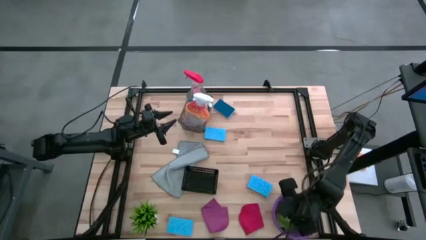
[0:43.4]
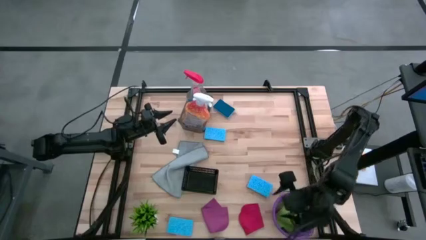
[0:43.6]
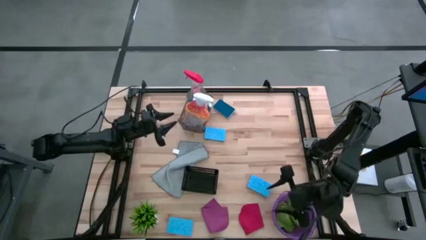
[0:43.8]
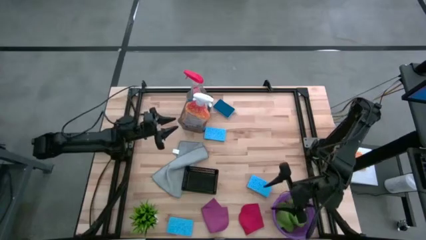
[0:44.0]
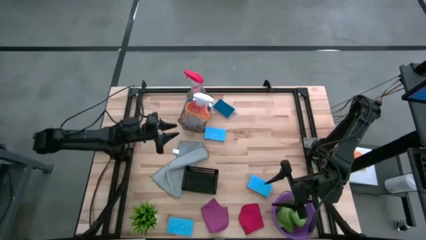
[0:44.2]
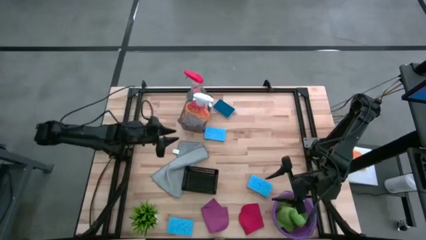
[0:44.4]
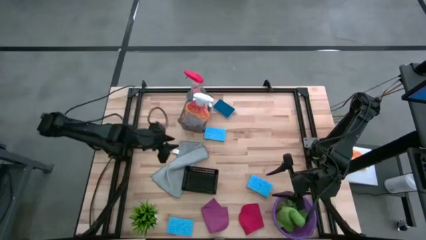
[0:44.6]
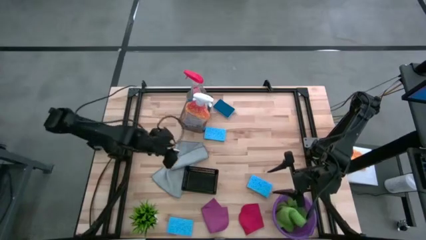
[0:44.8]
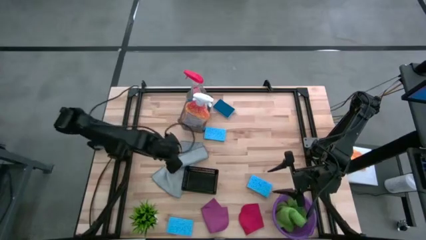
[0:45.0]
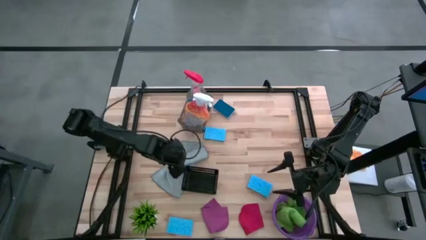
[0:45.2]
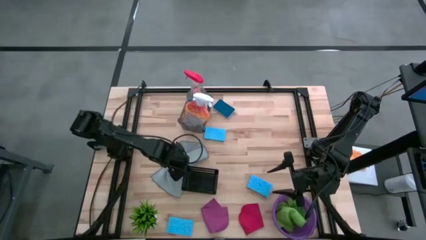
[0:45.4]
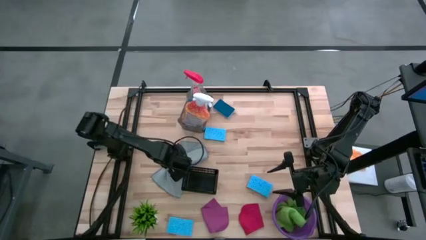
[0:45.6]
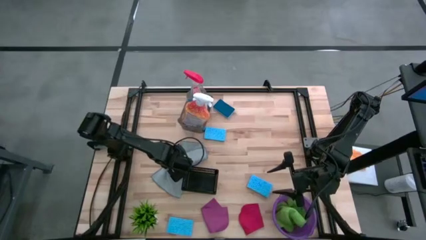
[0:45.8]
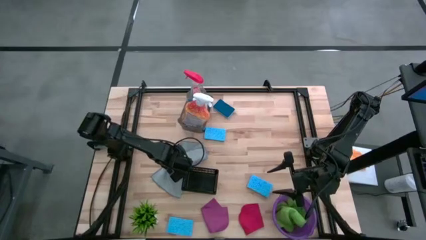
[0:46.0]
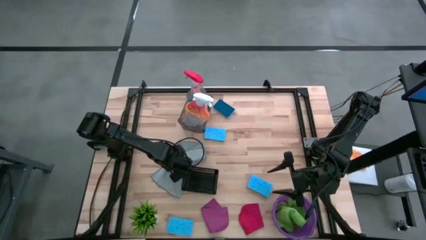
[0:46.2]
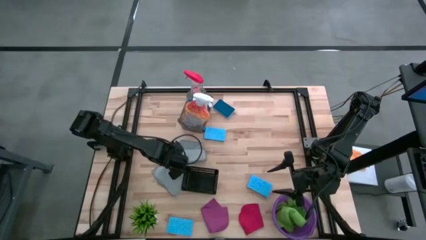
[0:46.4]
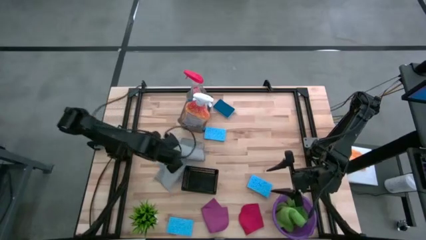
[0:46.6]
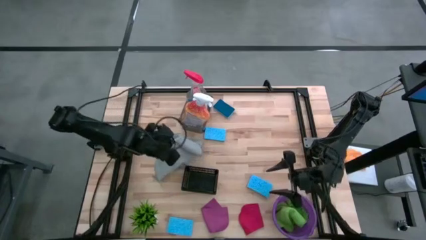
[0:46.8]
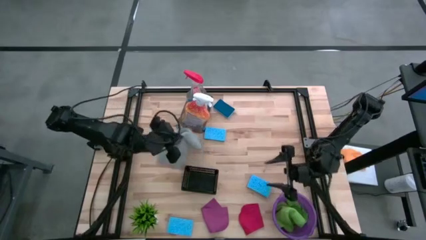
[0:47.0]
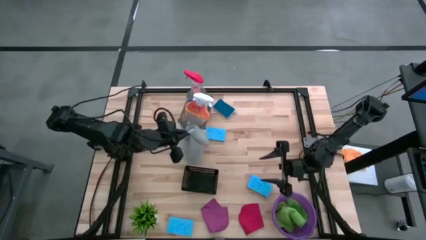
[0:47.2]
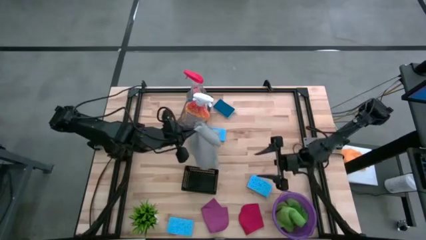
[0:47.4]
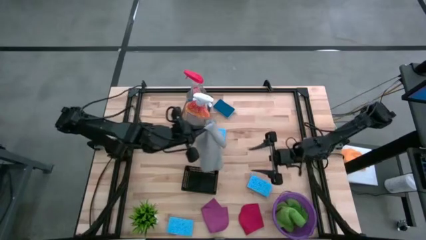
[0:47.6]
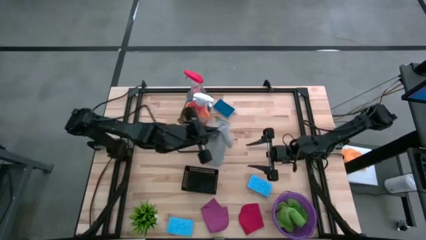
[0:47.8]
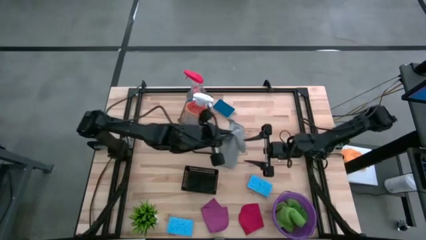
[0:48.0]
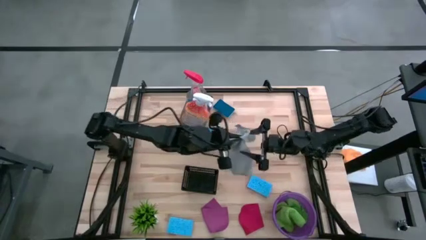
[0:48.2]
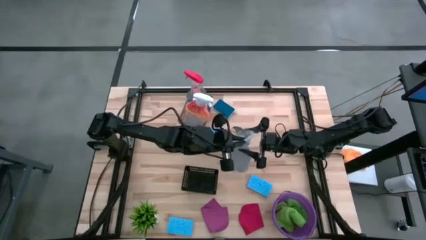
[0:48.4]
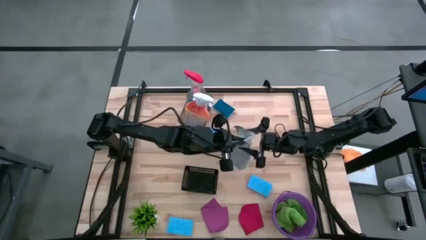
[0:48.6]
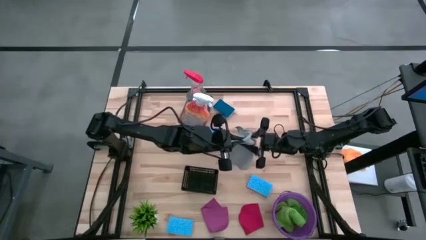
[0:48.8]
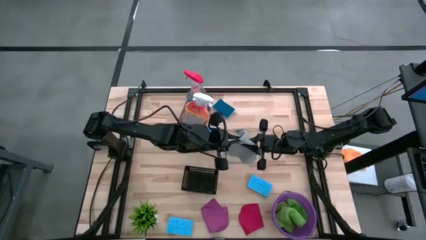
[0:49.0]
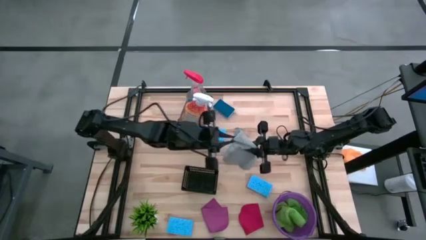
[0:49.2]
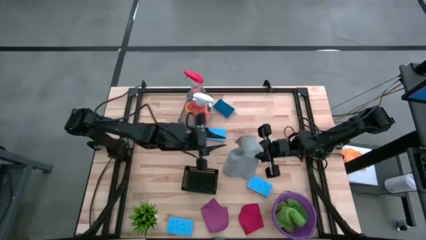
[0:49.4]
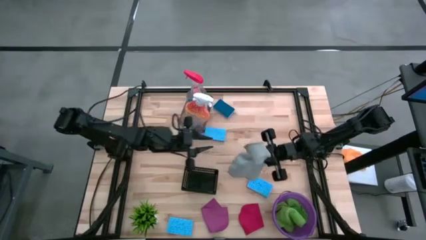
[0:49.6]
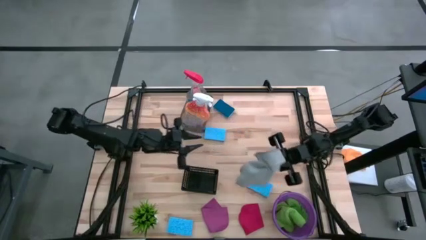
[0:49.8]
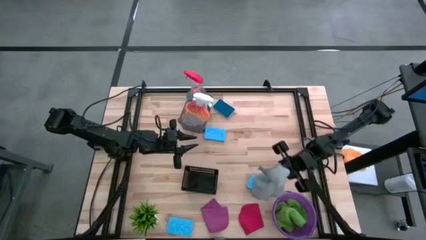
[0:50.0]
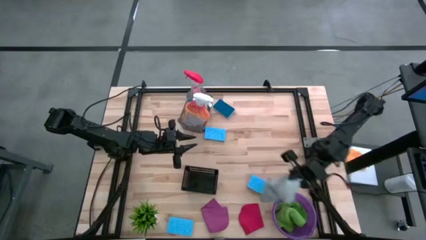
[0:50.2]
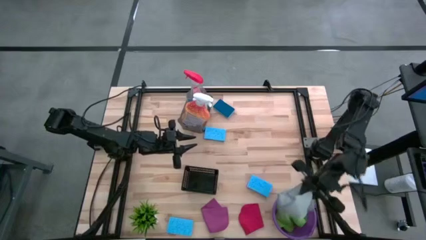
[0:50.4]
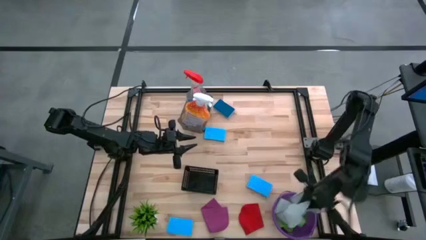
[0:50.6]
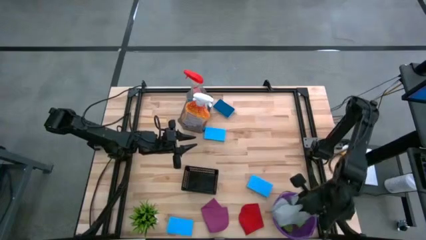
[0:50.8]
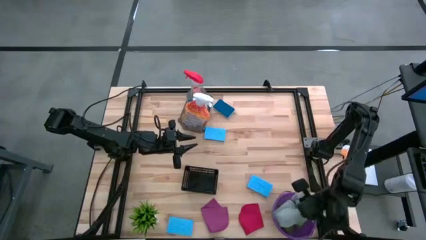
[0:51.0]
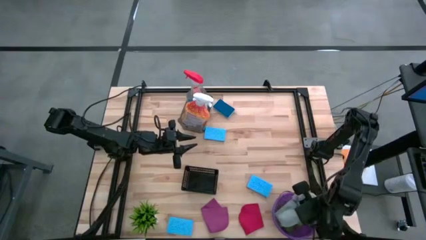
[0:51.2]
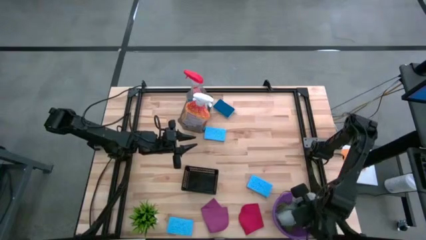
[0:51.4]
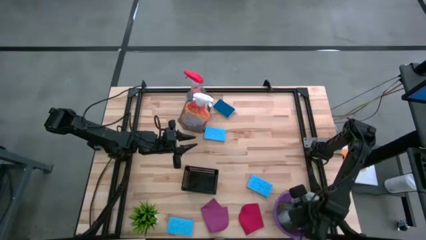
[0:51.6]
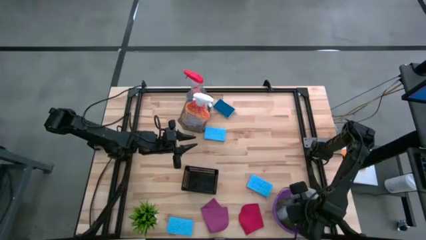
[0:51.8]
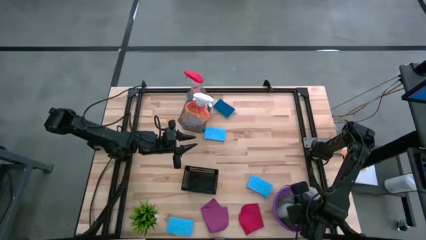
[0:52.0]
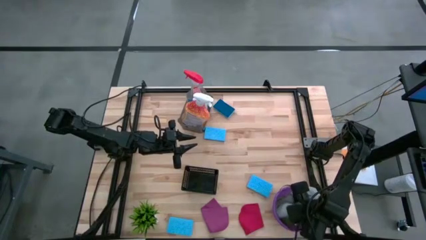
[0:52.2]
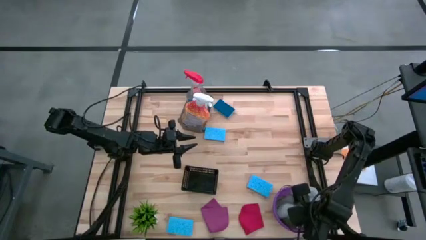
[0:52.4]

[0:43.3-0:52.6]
Task: Pick & Place Kitchen Items
Put the gray towel into the violet bucket

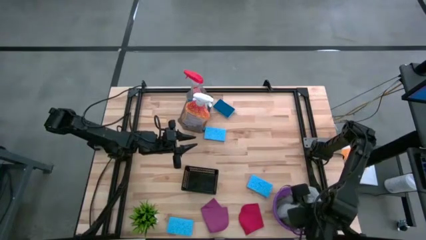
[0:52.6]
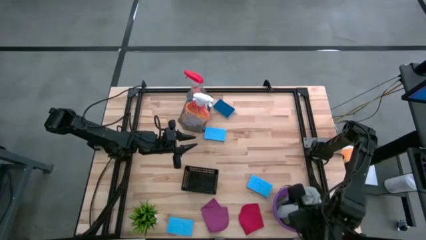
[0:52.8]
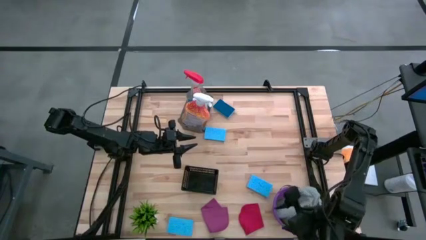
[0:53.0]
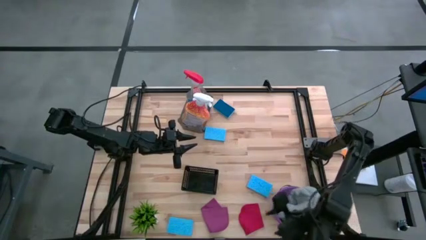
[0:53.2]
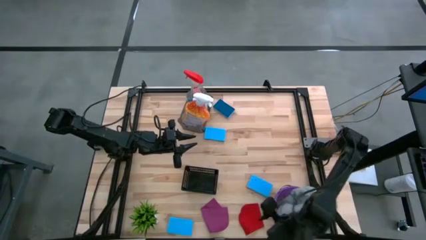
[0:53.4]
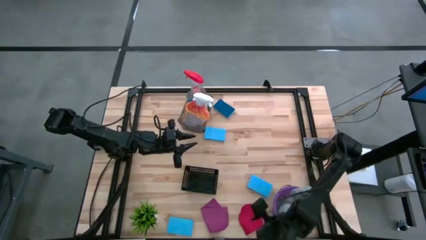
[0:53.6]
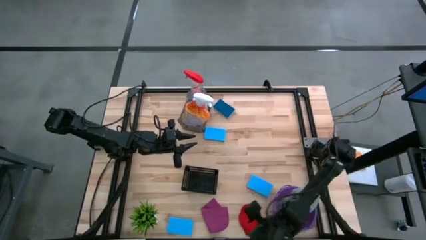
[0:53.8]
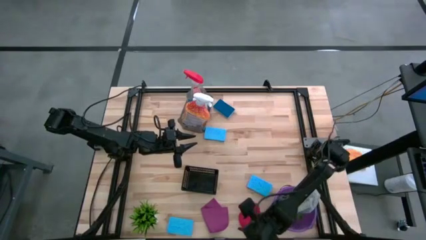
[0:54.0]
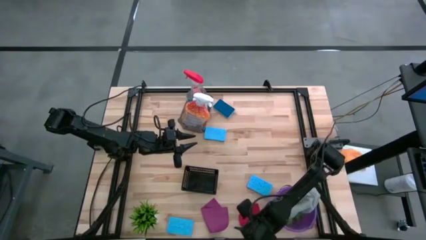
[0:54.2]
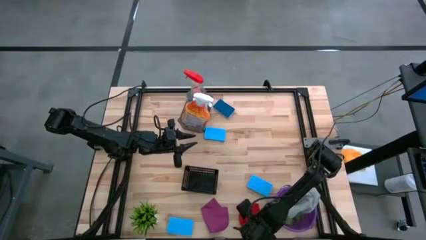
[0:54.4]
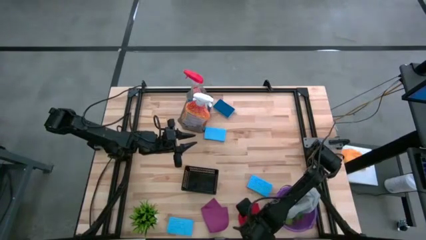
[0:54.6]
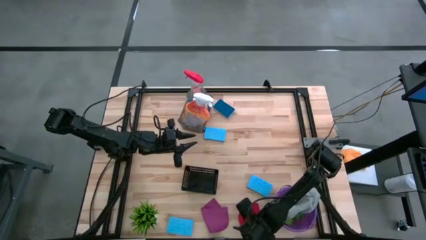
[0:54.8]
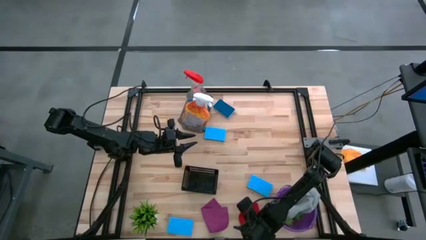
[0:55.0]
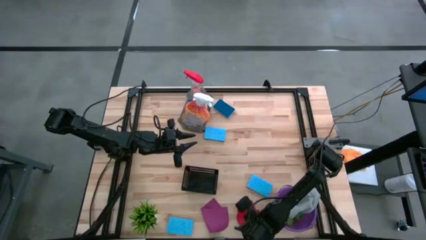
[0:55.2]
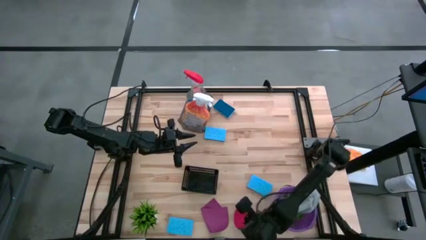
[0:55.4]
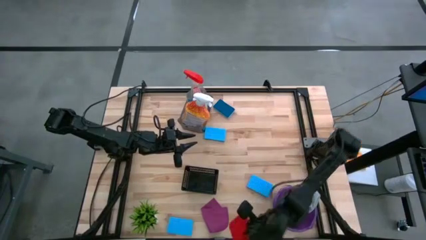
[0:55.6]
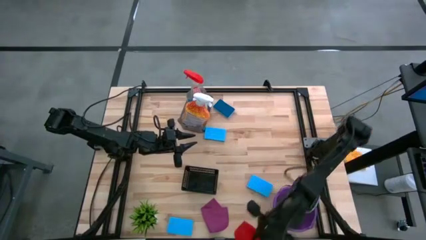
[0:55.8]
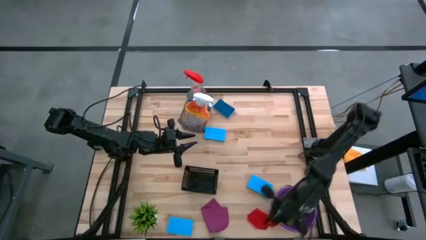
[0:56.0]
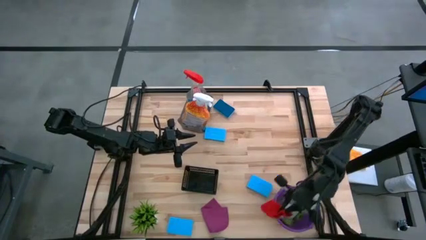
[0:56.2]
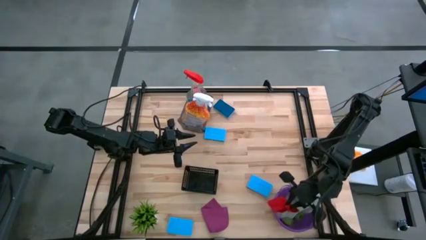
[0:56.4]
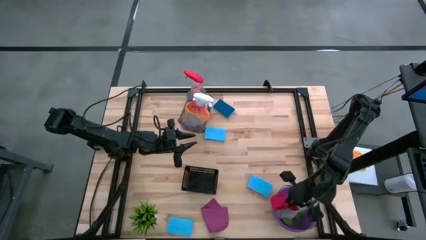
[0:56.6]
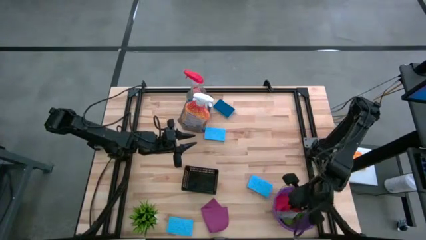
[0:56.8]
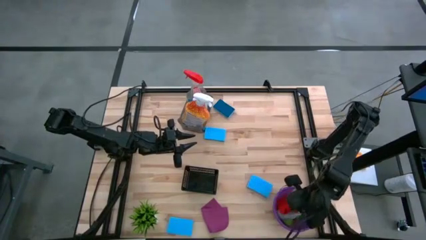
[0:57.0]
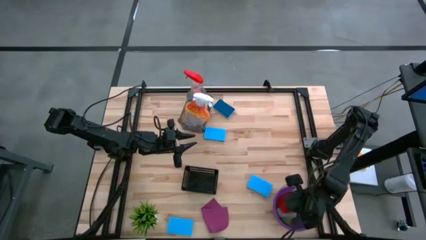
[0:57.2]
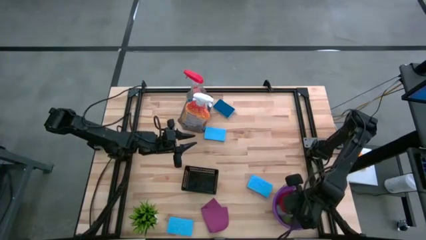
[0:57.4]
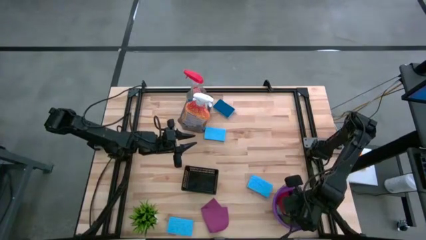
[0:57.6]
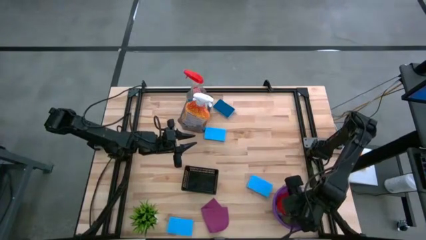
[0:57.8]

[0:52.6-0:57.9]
Put the red towel into the violet bucket

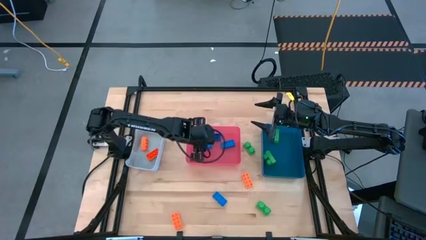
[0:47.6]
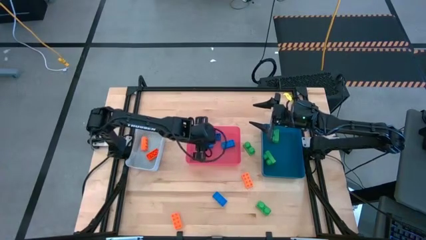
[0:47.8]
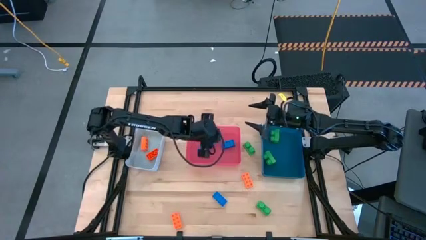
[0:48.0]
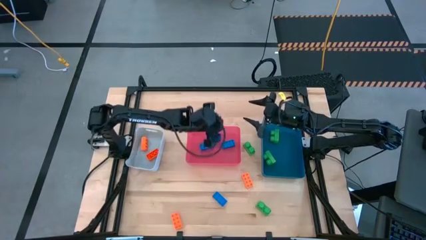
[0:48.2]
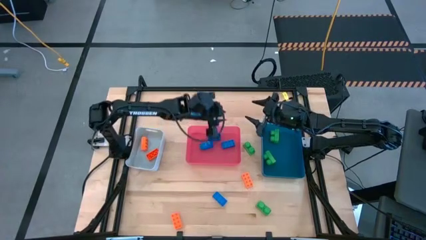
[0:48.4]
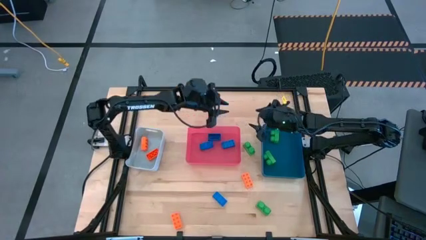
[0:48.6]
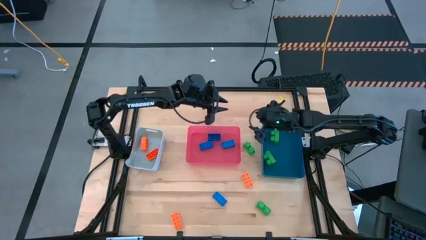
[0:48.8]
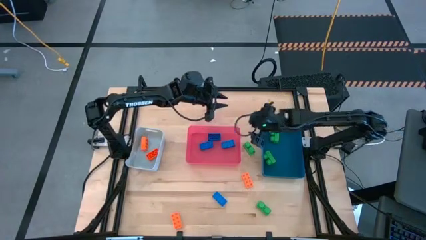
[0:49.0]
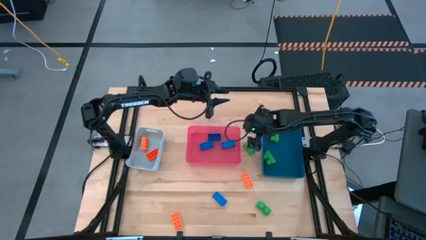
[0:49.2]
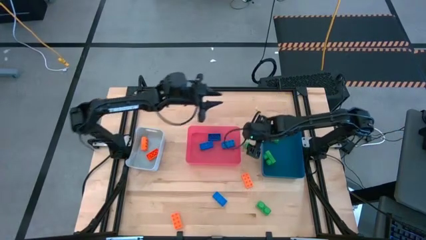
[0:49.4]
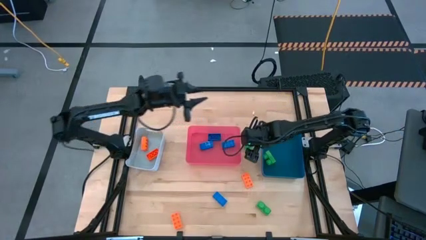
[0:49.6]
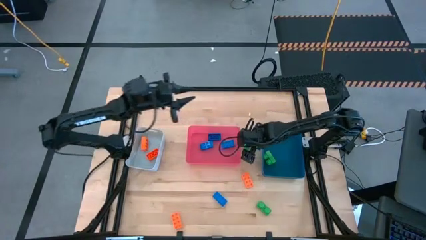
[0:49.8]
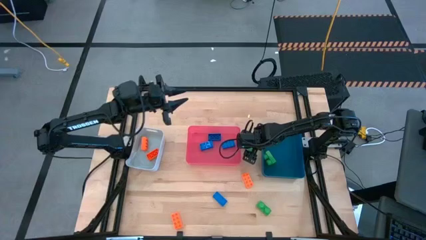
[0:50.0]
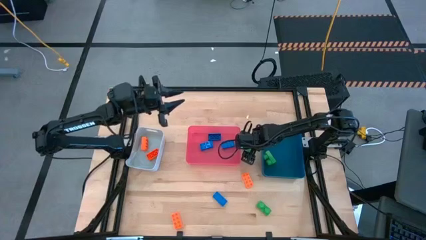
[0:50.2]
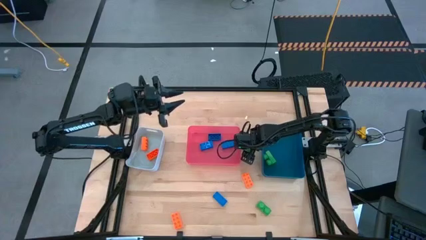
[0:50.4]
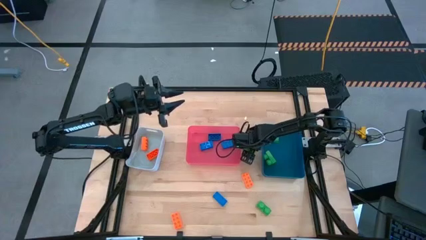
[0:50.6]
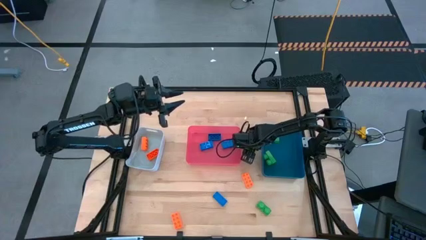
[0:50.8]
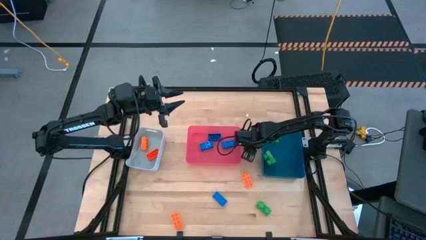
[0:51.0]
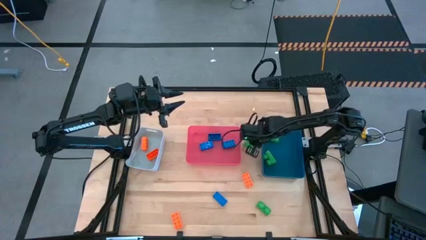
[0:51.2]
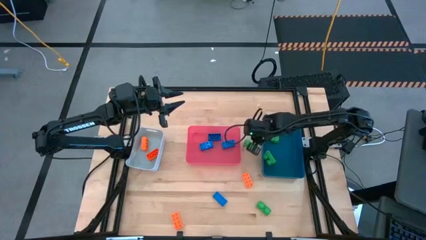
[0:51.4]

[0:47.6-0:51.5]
Task: Sort & place blocks by color
Put the green game piece into the blue bin
